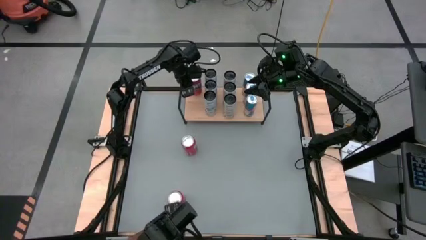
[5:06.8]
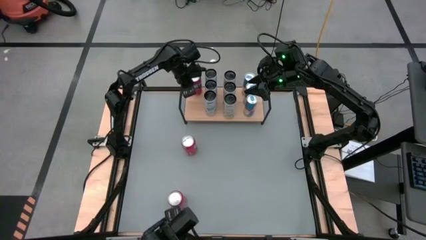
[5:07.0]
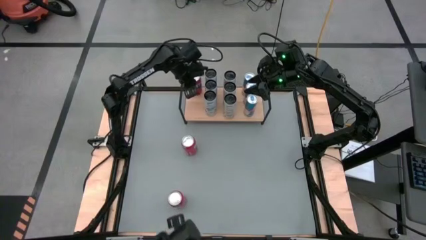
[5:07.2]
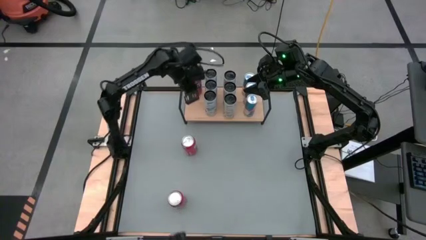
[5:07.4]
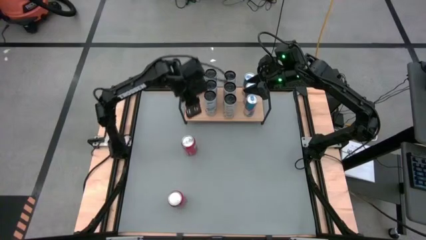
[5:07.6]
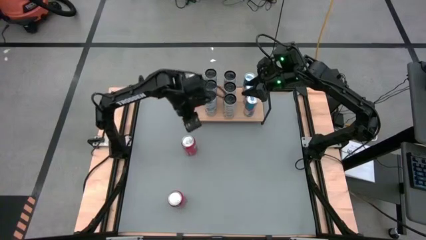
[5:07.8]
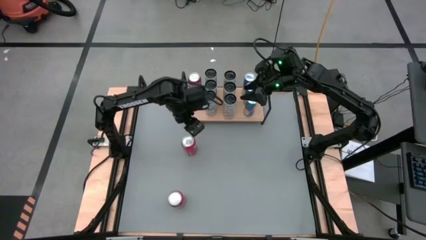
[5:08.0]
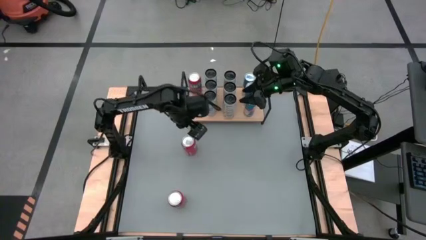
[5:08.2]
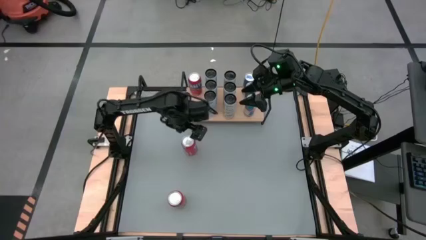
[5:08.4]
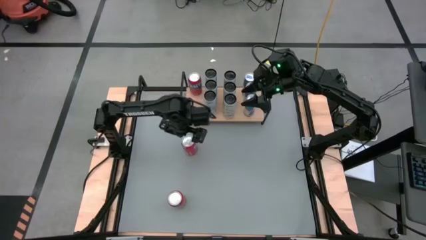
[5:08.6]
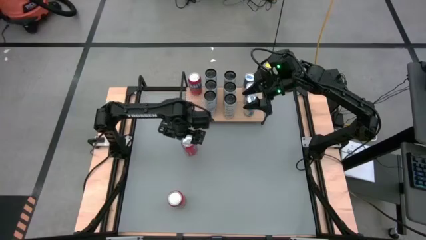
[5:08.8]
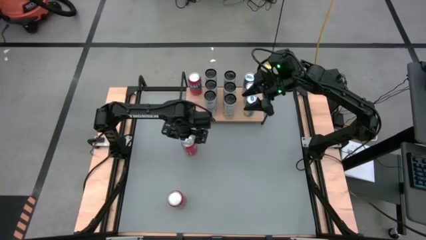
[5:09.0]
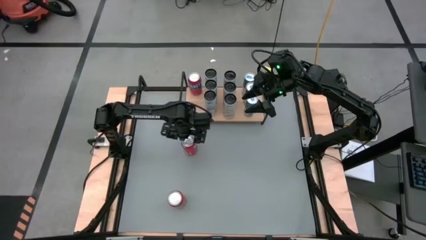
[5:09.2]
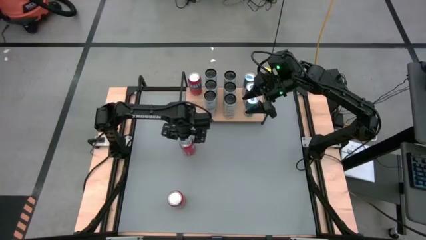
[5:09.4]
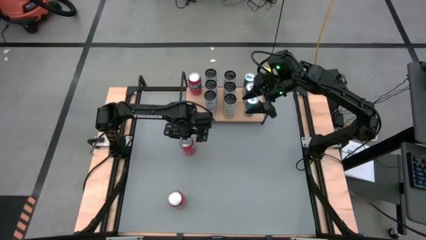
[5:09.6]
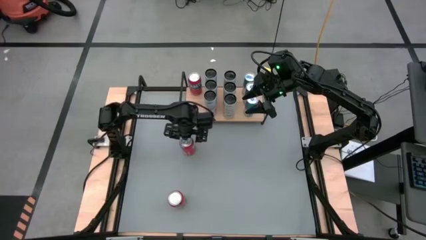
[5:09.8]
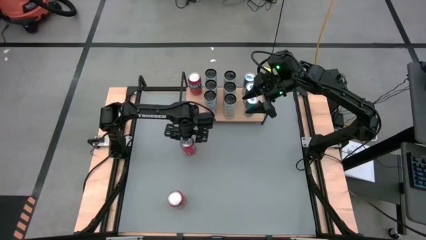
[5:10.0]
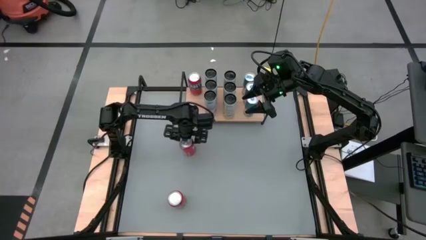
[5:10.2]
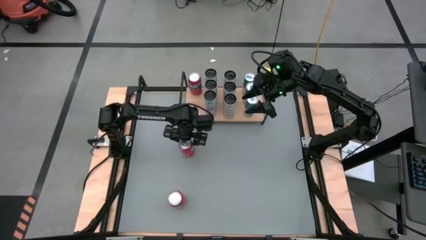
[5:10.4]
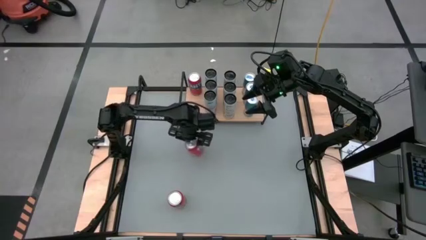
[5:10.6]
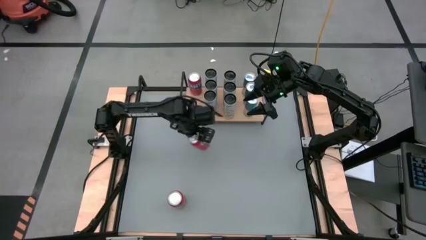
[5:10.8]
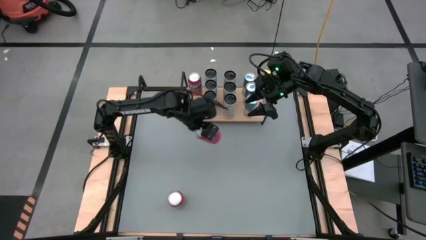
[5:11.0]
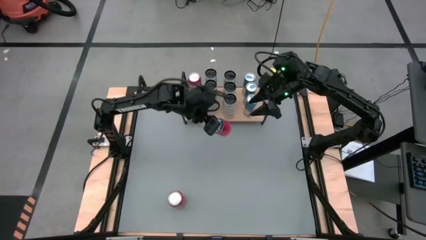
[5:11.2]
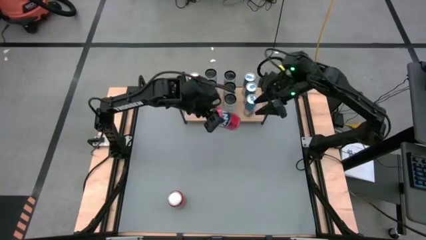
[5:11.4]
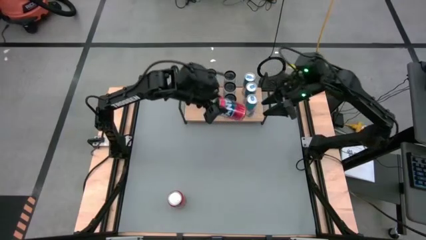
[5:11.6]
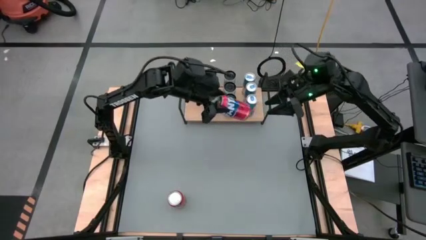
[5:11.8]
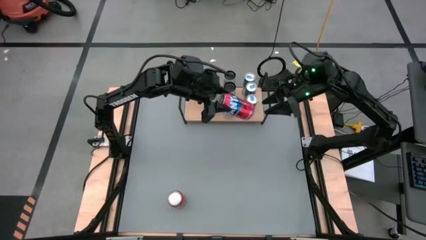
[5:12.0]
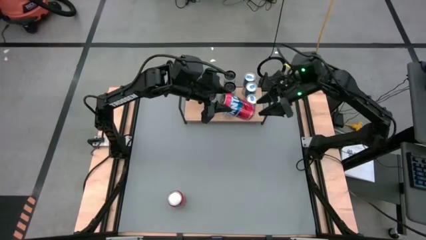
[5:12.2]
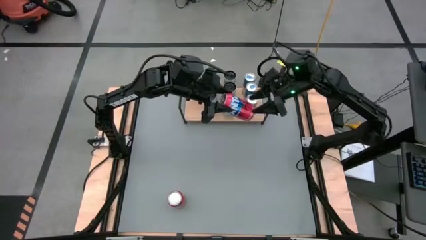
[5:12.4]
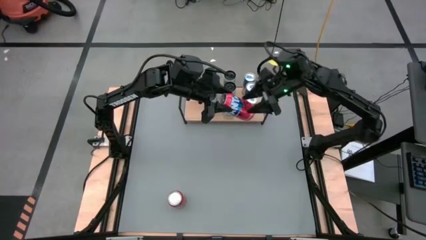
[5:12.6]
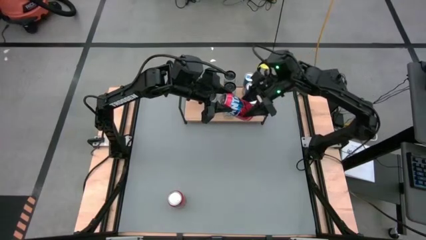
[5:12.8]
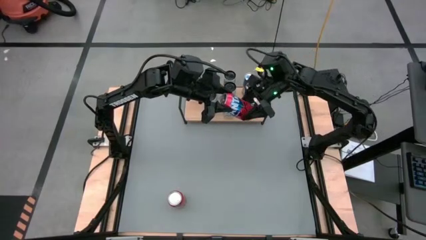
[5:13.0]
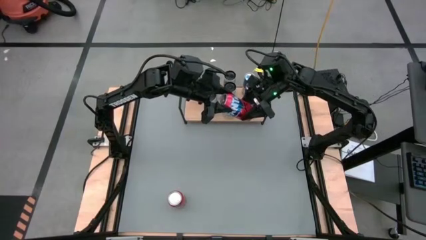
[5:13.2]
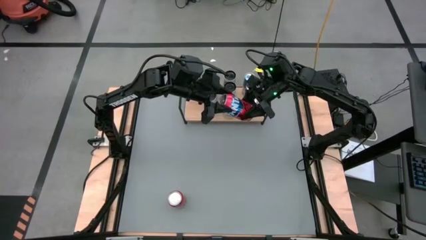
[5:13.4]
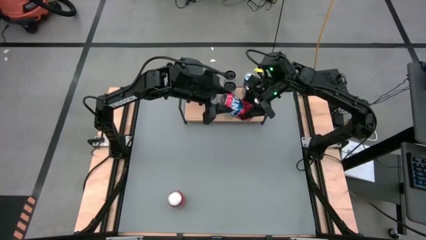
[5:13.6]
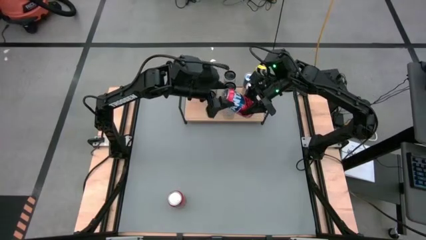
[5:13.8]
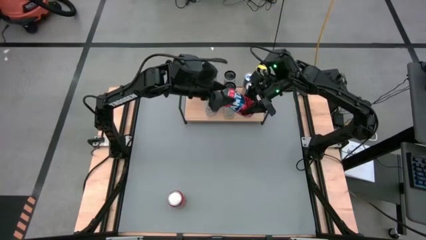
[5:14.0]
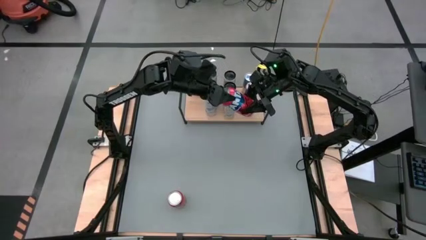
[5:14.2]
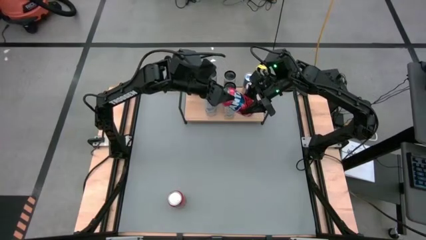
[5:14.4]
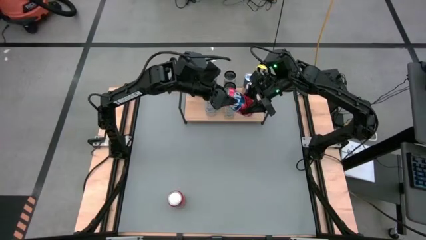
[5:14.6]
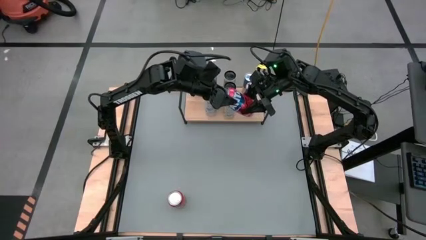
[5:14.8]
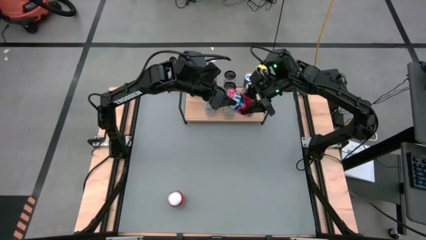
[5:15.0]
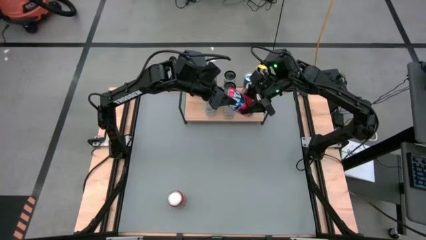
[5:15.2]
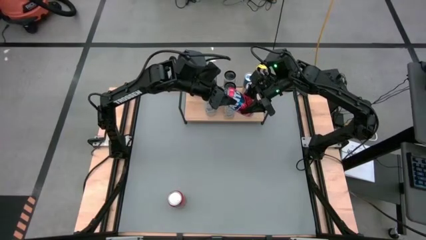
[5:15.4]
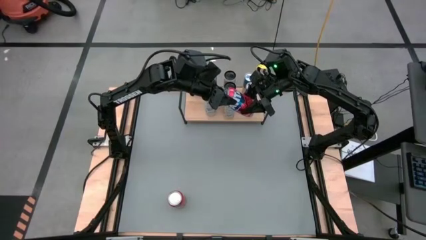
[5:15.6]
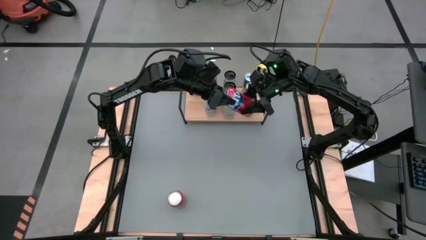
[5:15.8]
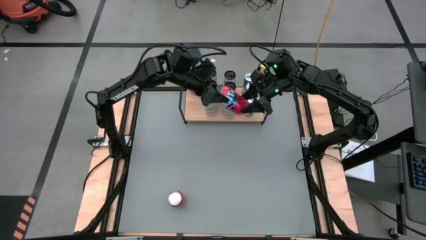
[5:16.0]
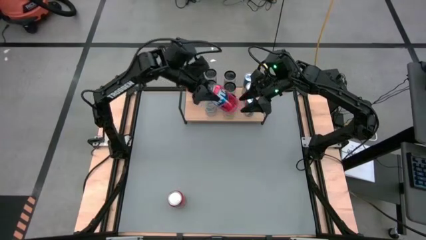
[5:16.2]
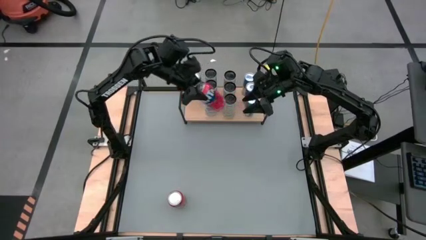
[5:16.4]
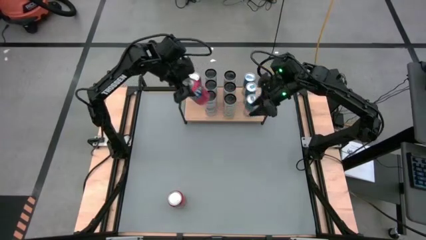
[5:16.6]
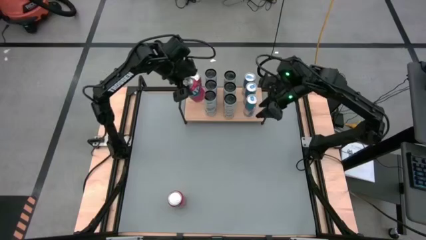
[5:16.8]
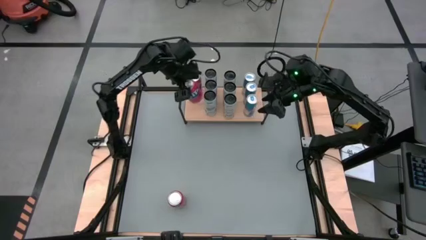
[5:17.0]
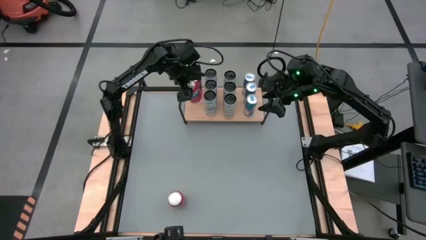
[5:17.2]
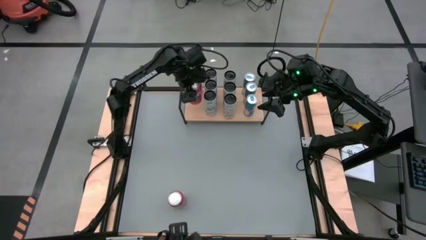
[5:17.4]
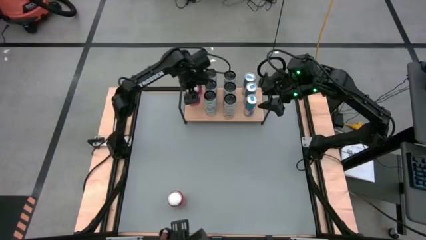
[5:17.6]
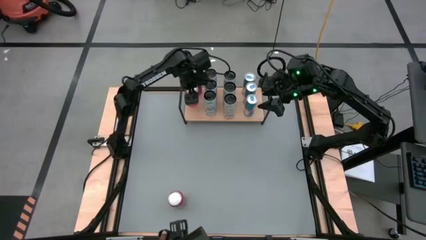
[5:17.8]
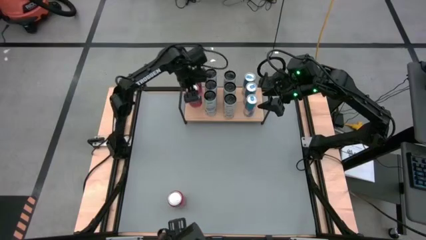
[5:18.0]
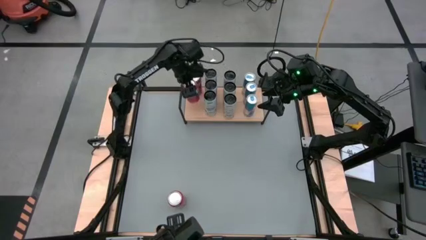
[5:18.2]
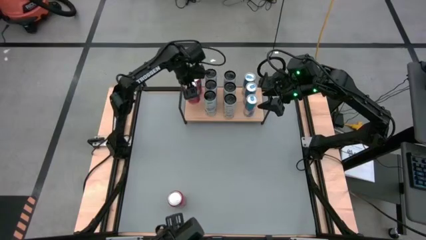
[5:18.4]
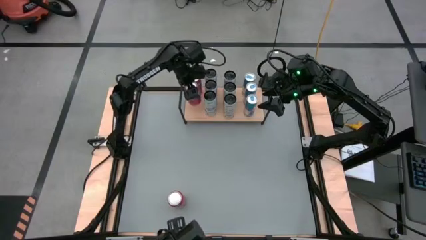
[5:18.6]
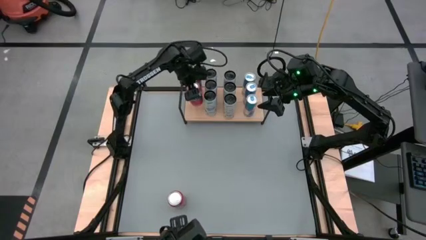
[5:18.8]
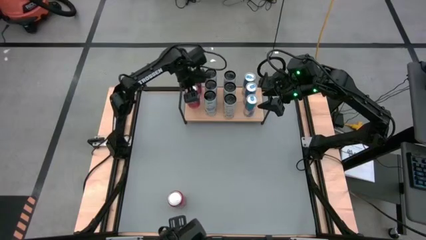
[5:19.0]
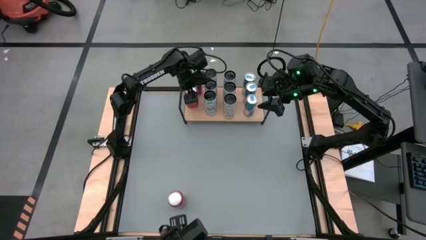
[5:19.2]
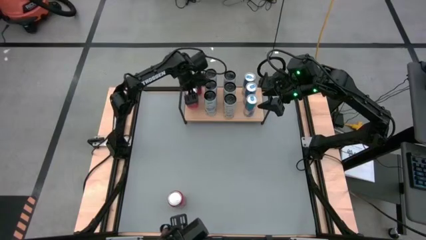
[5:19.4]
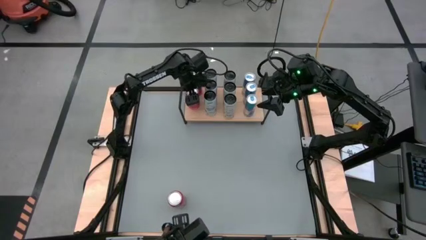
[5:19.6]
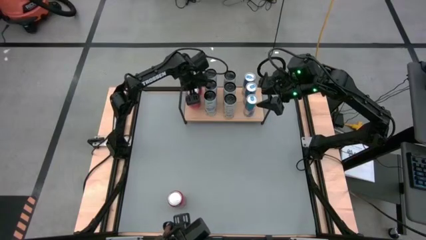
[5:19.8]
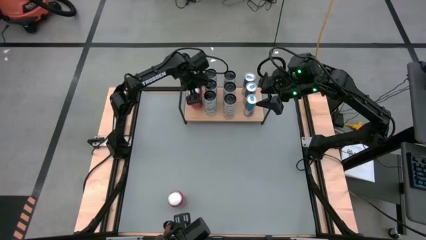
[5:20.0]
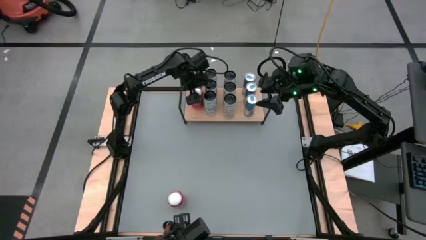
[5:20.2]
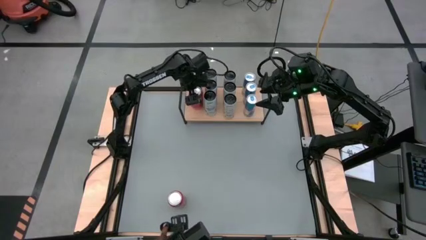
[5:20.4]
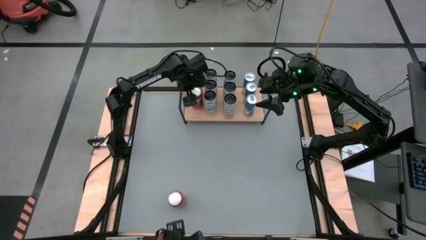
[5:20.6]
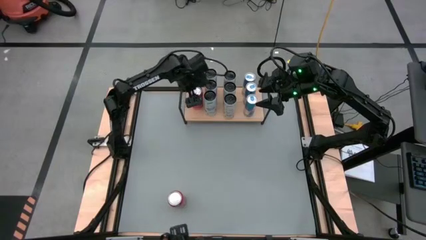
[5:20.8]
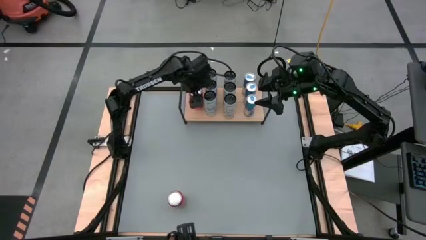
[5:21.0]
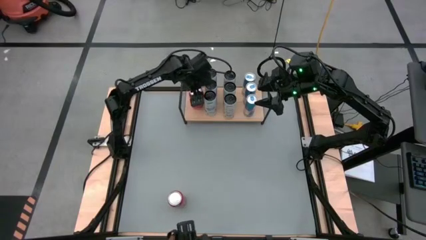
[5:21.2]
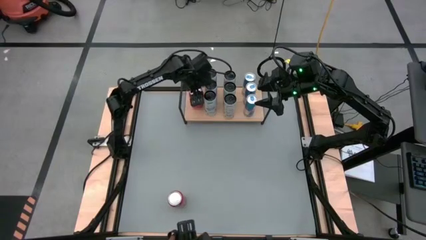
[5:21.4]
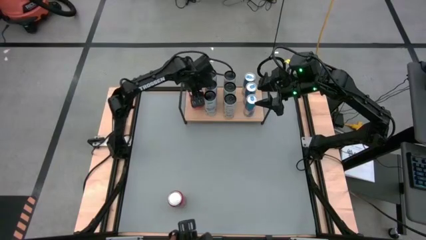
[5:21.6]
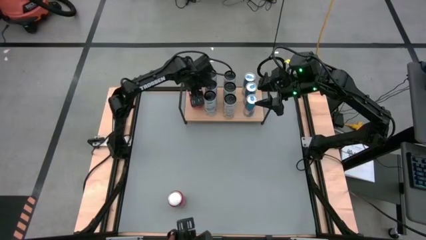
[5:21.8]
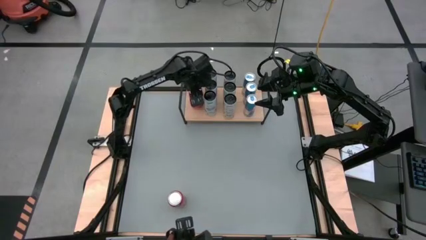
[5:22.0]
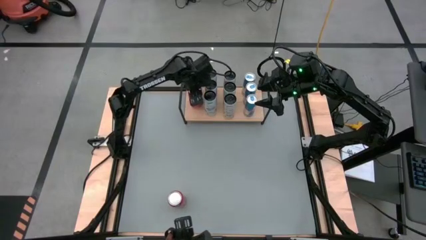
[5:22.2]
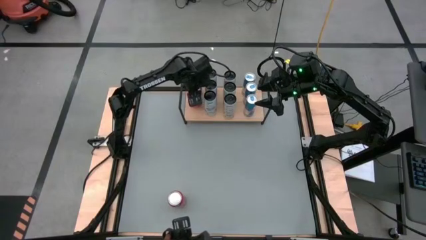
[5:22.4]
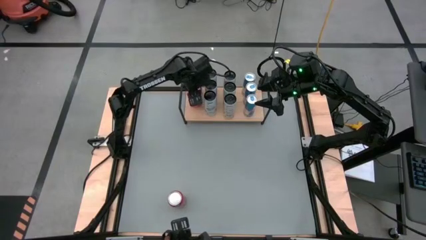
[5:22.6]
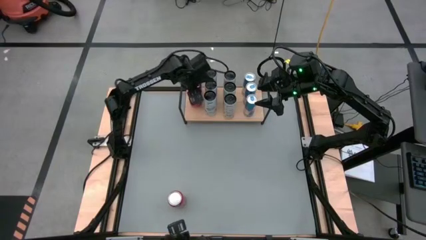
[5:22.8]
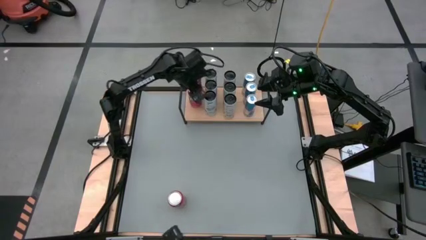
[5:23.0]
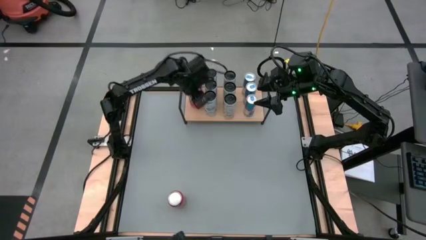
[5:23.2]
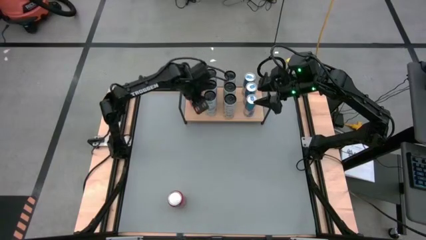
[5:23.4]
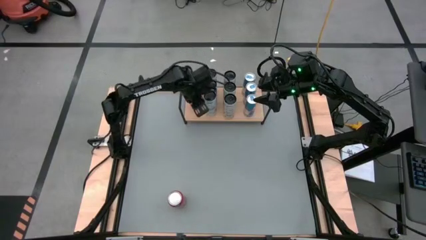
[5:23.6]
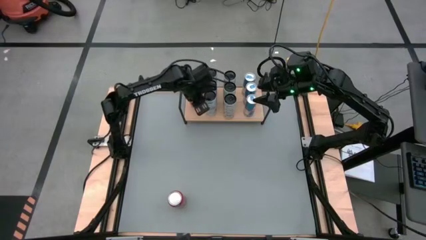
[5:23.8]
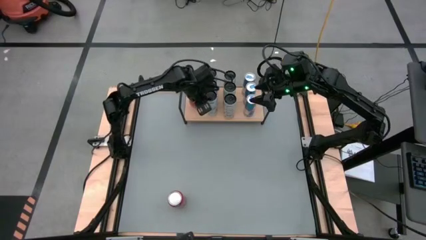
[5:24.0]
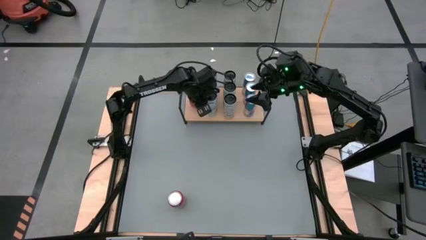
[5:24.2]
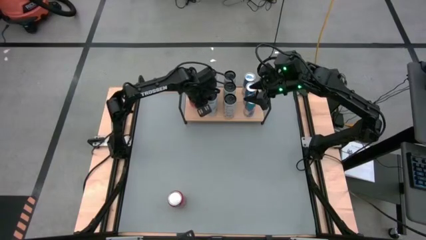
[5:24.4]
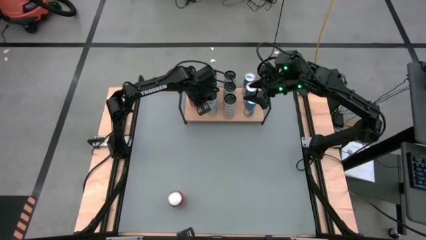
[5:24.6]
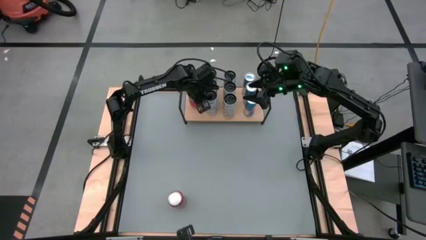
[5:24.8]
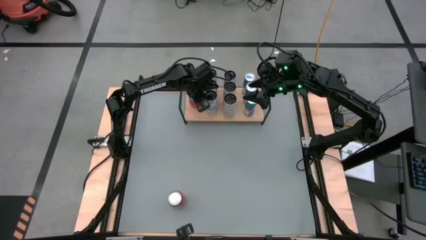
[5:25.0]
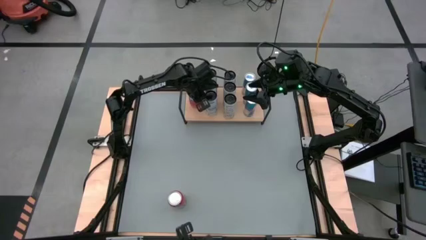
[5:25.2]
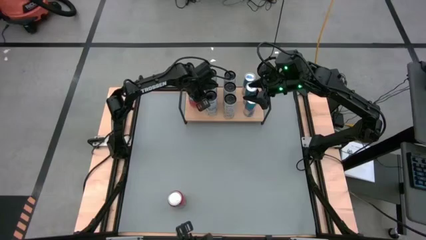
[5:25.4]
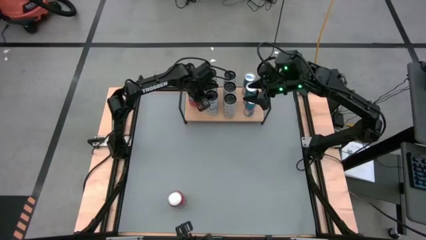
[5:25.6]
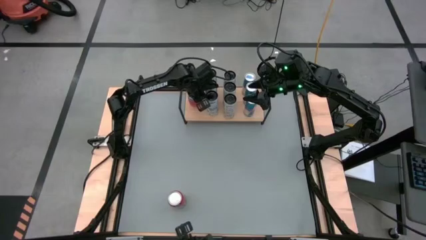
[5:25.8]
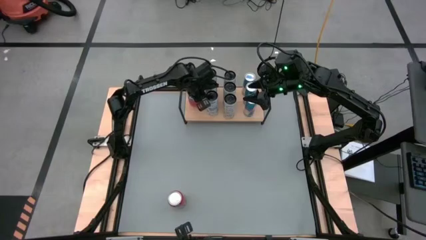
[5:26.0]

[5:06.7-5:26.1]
Task: Place canned beverage on shelf
Put the top red soda can aligned with the other red soda can on the shelf
